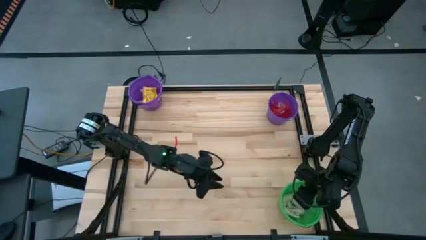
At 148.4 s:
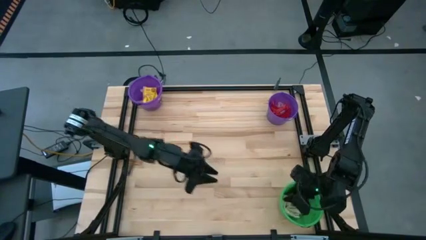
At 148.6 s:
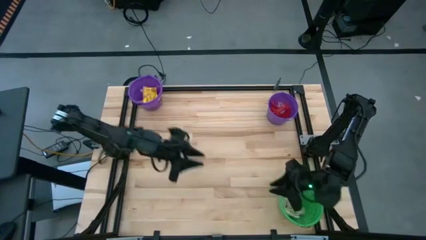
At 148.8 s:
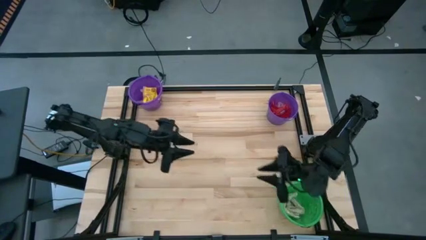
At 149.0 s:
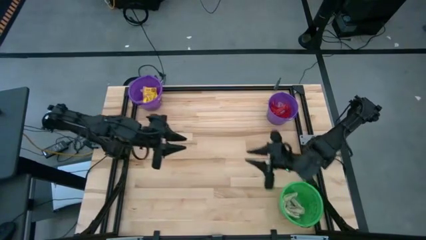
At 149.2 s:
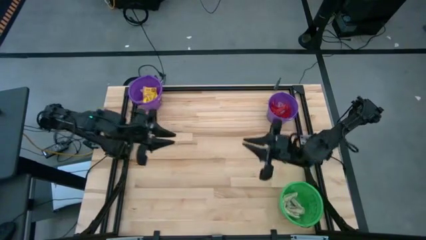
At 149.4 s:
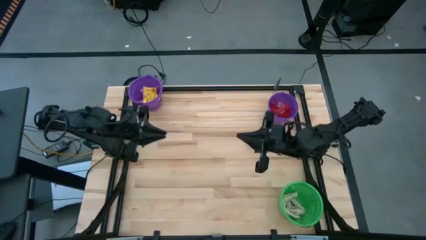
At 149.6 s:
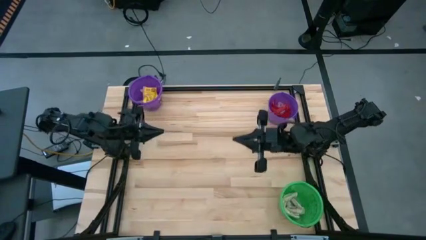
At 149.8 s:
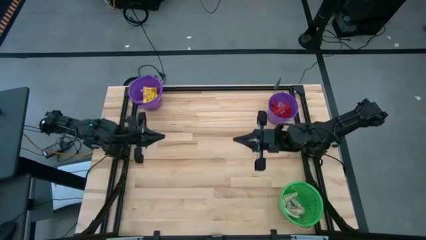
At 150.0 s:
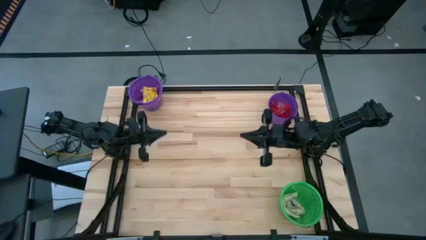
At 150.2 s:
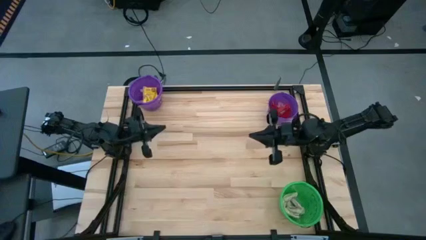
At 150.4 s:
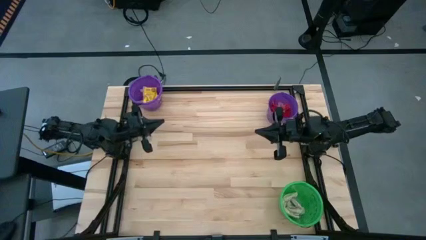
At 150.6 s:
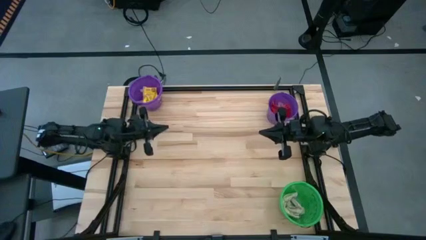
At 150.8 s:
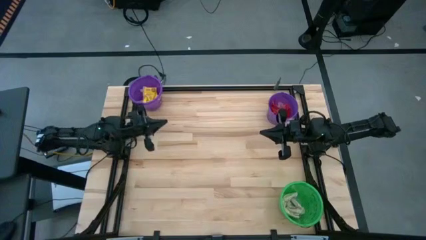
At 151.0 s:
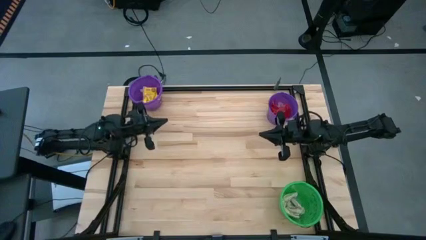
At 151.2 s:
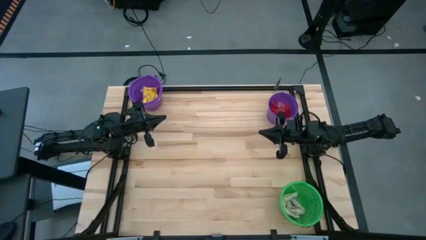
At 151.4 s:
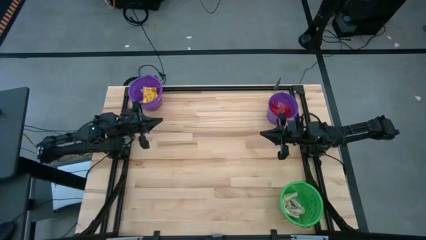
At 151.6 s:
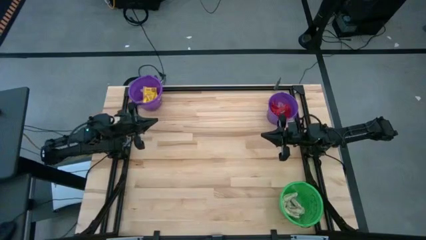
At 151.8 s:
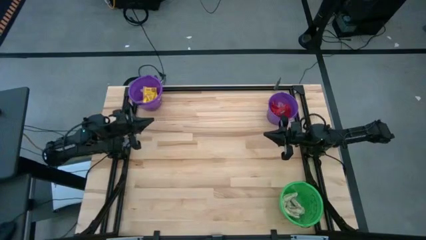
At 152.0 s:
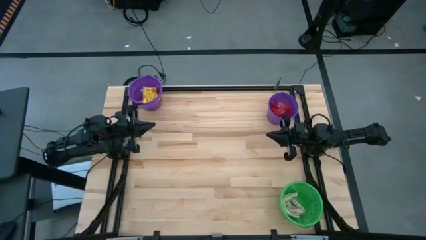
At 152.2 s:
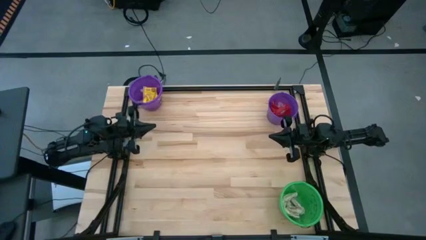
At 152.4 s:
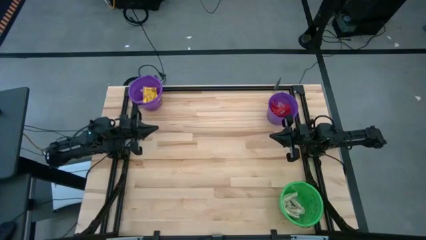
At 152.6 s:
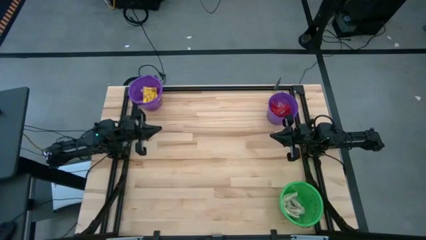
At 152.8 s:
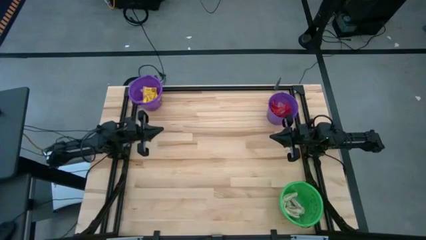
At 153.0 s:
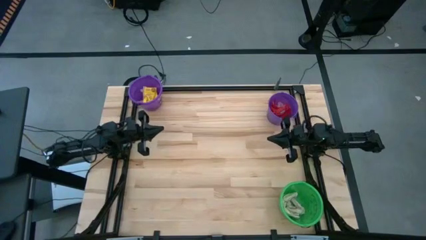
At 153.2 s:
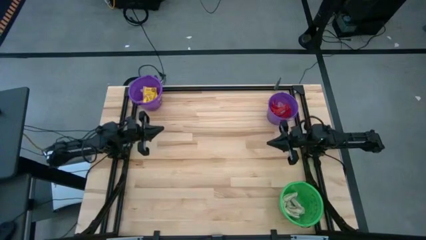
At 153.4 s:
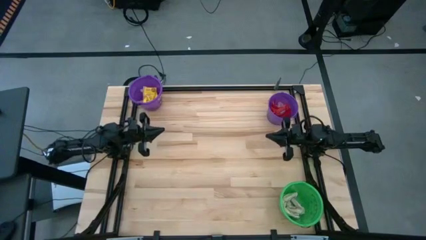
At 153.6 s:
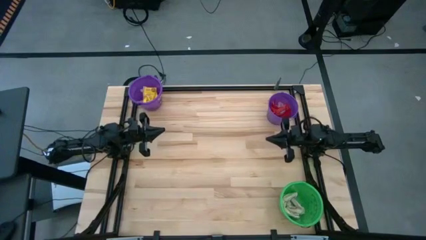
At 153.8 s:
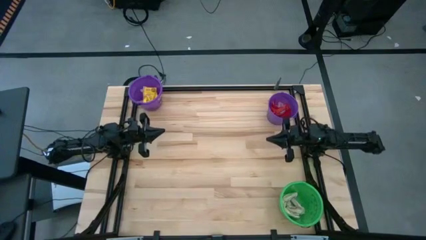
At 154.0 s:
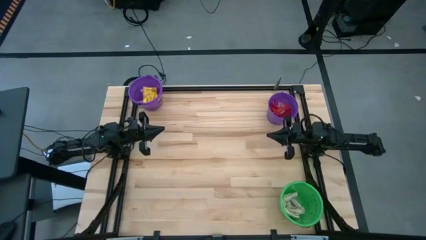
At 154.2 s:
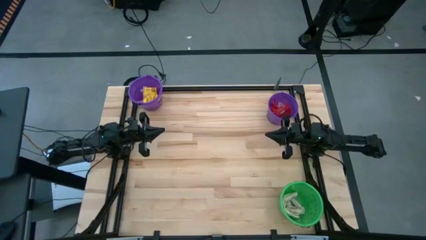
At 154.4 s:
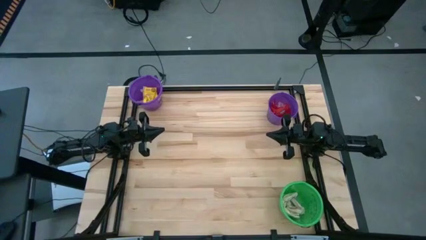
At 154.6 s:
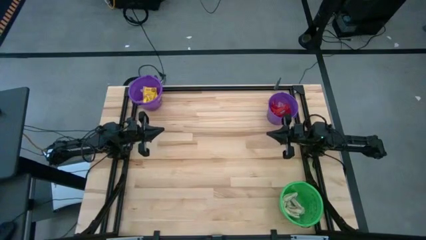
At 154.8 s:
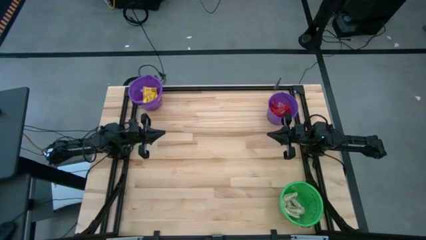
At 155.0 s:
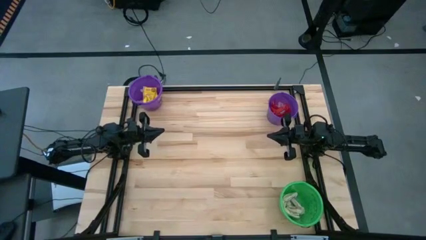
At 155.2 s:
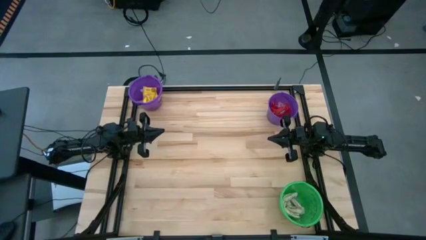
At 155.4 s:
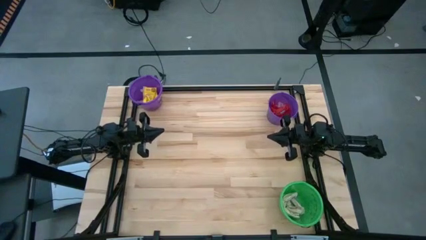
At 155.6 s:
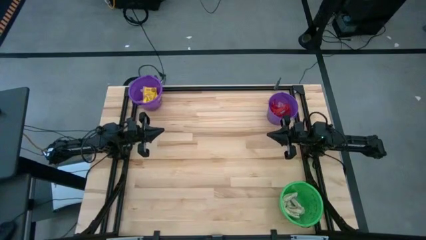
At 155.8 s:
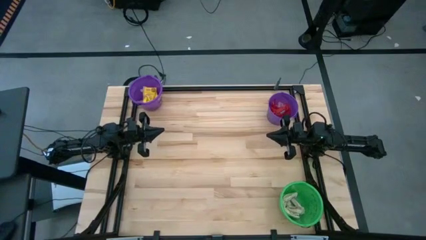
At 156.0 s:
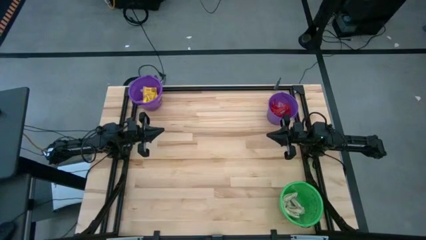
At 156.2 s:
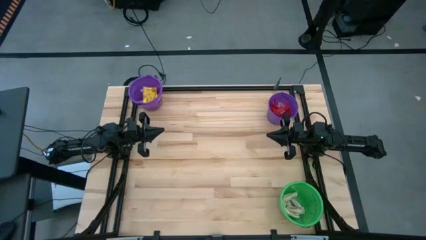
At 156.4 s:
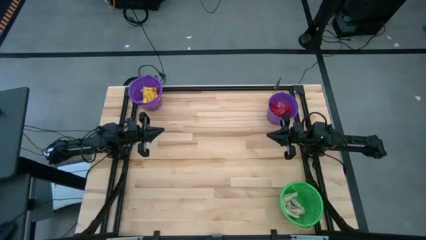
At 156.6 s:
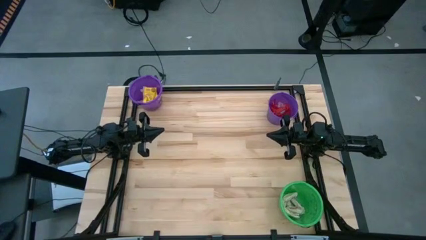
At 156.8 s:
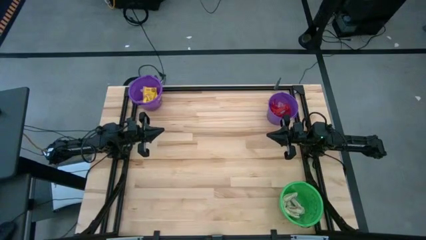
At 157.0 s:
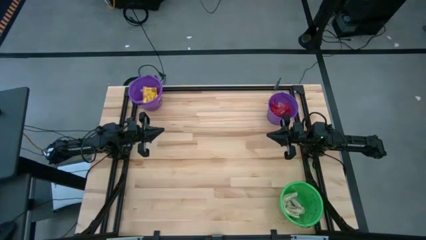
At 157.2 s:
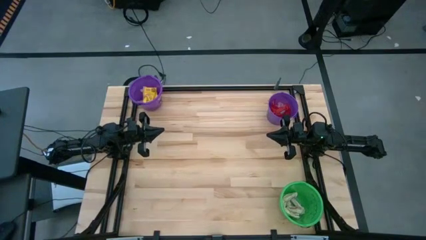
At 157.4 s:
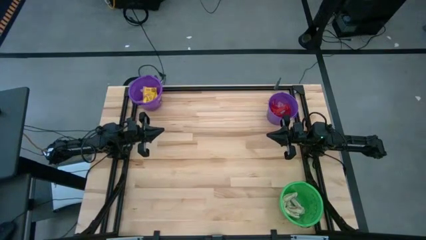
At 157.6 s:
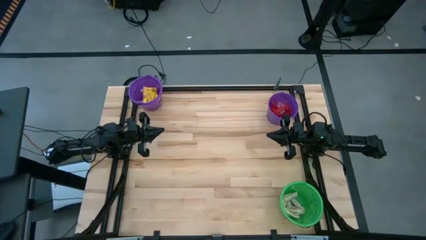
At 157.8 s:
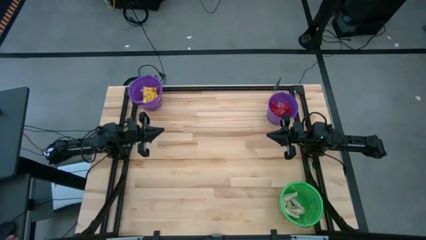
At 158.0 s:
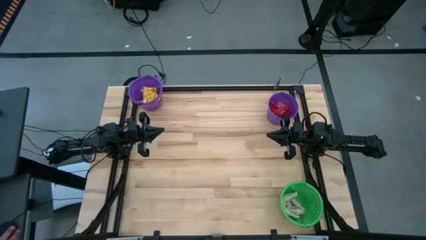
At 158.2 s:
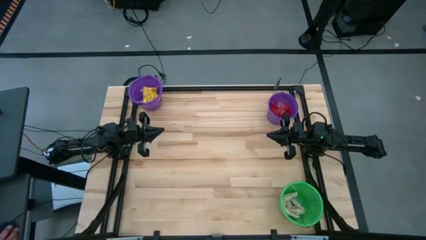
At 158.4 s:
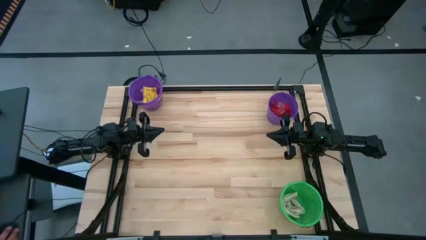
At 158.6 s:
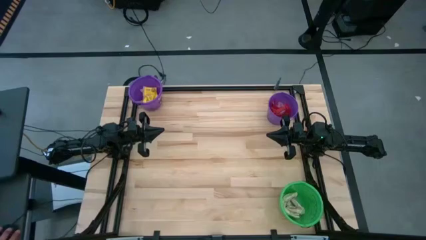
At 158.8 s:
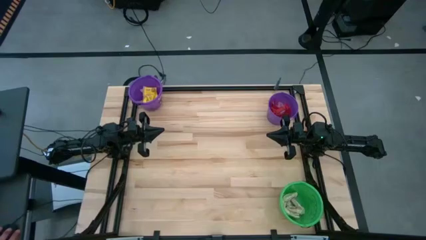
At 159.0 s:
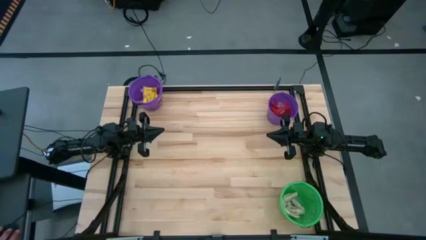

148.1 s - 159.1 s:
Task: Sort candy by brand, put in halloween buckets
Return to Home Position

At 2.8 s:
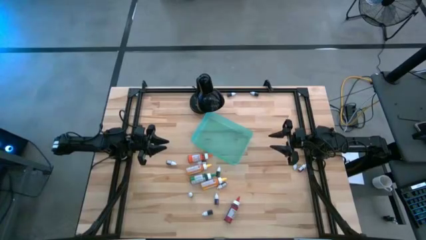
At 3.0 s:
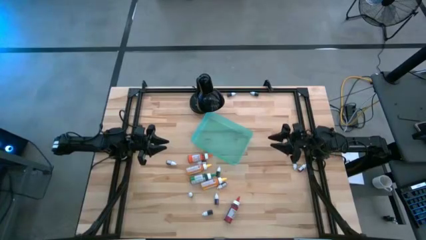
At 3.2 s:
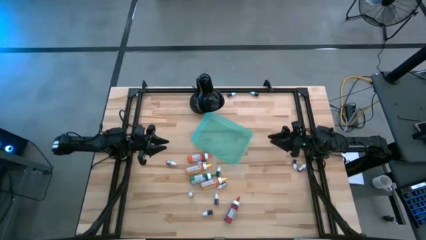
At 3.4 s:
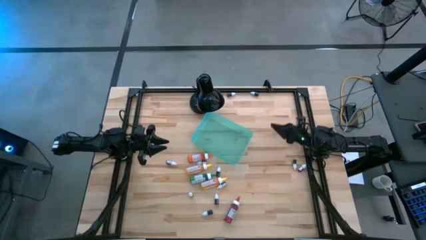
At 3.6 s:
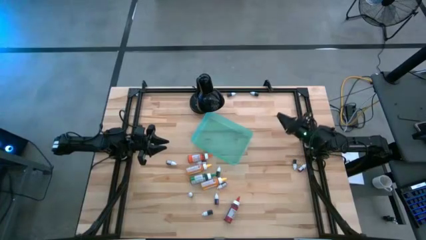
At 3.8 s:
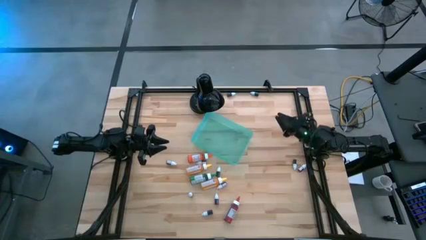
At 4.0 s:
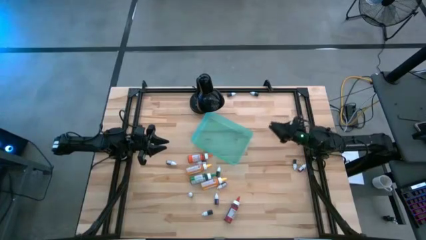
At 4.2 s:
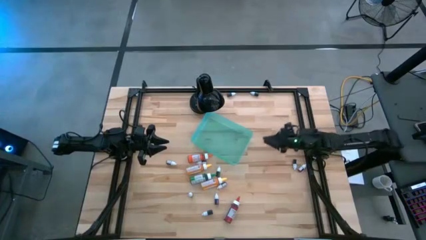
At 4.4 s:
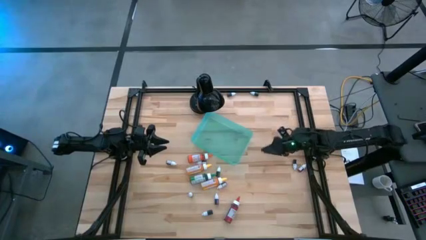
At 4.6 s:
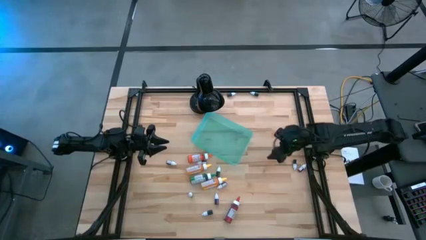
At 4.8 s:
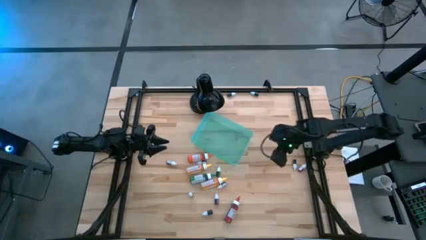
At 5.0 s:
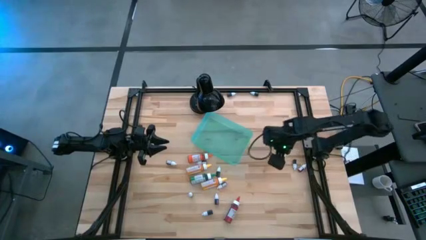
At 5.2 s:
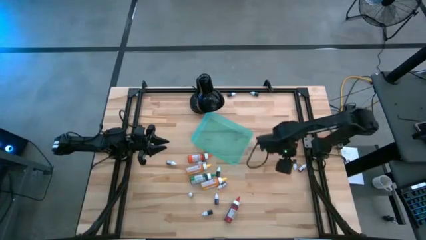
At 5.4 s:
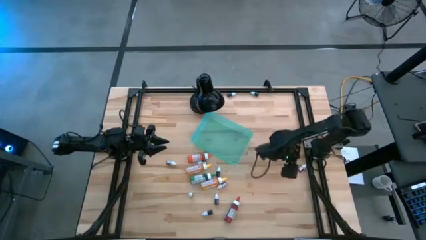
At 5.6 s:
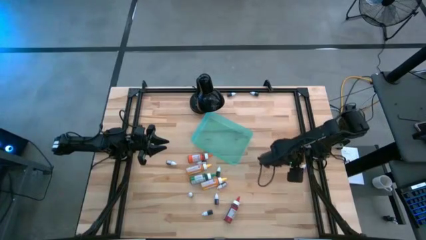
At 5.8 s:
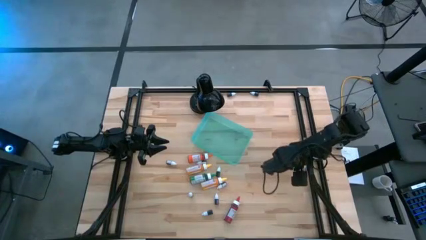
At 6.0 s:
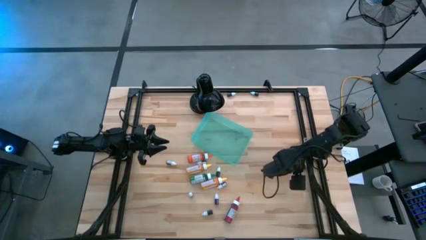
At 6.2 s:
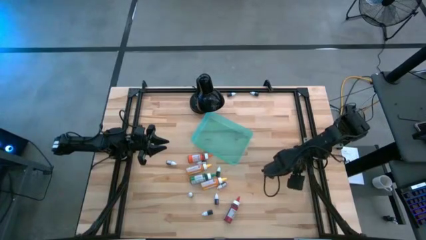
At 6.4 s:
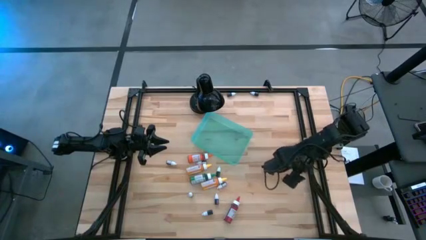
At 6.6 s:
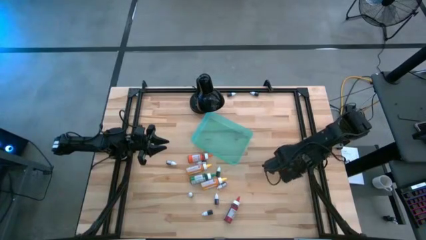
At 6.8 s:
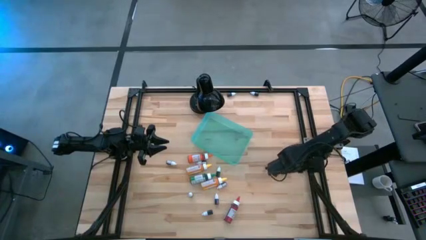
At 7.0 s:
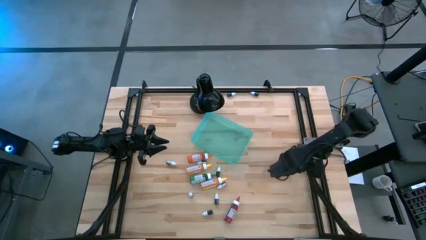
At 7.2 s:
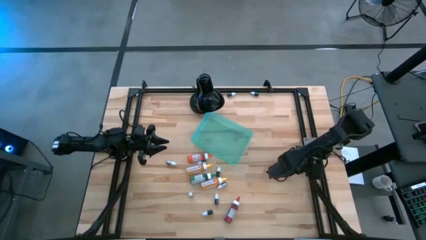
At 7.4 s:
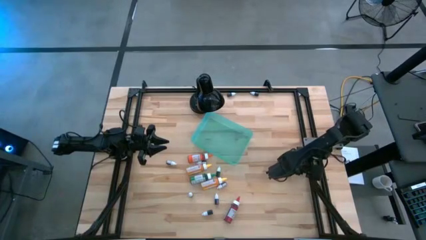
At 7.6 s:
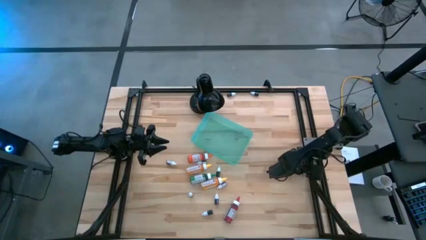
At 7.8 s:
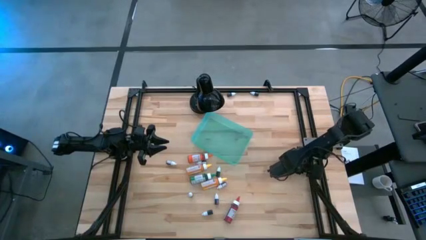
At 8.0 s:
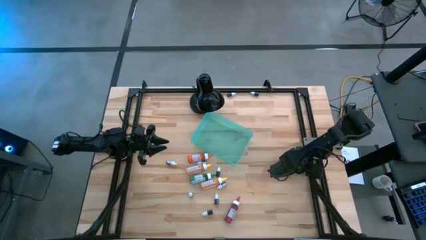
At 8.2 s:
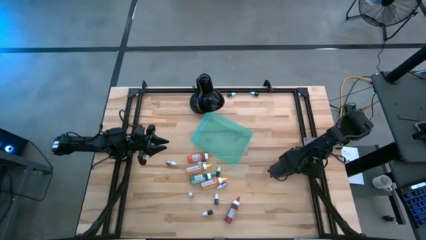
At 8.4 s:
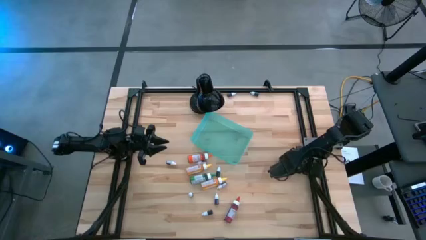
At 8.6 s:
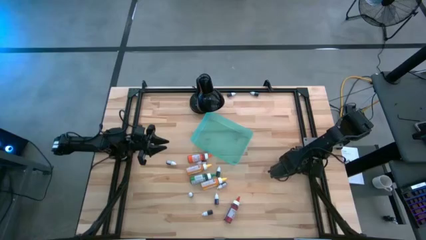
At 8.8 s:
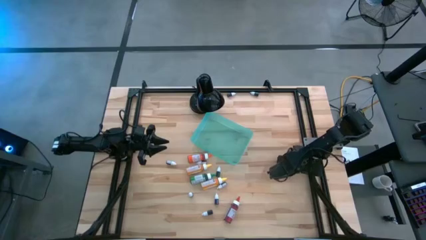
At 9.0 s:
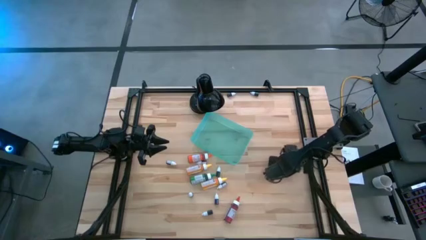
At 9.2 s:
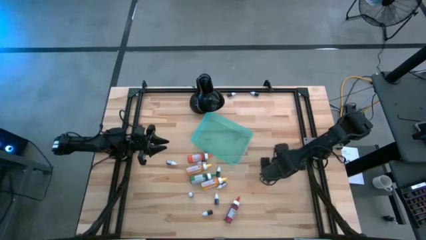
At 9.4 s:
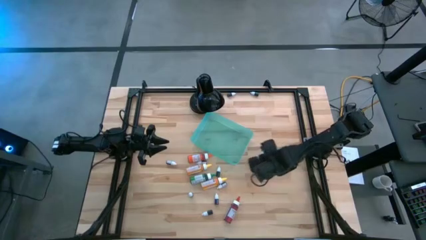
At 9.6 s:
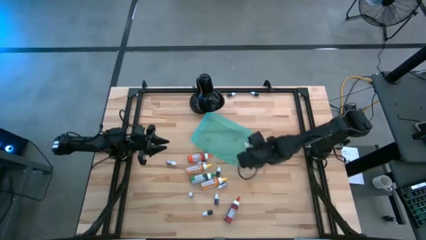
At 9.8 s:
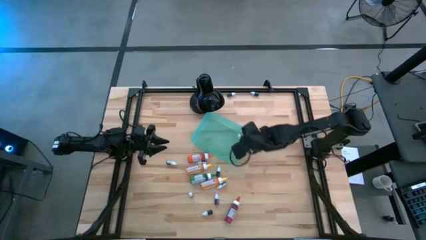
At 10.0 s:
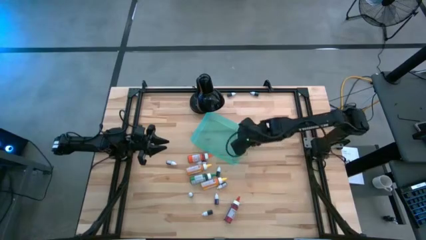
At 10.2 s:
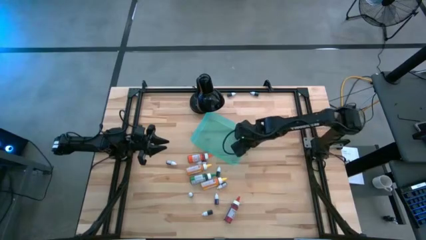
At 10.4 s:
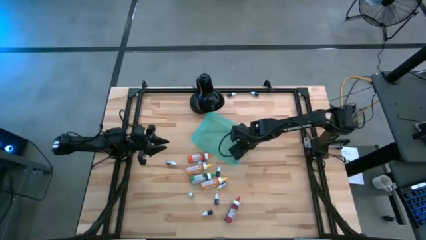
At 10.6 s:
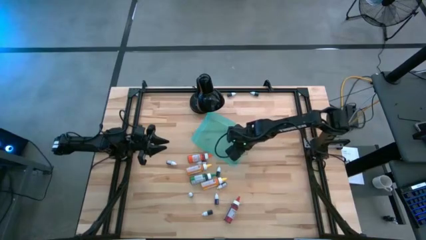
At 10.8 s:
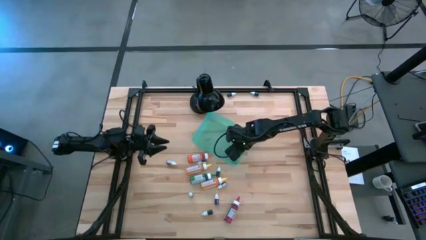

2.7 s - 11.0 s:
Task: Pick & Place food coloring
Put the small orange food coloring bottle into the green bin
